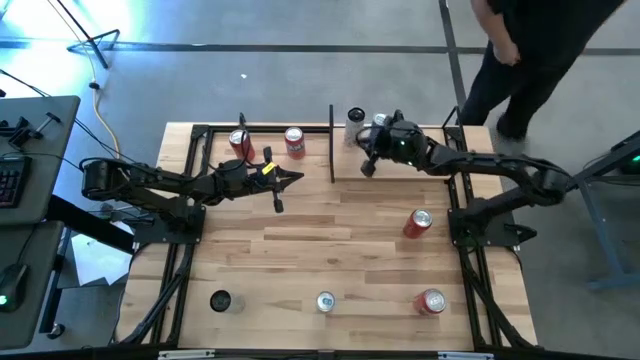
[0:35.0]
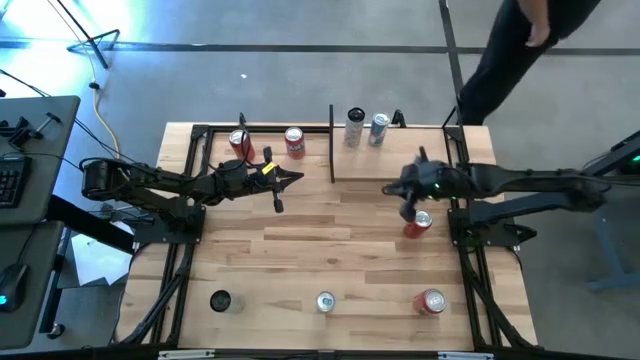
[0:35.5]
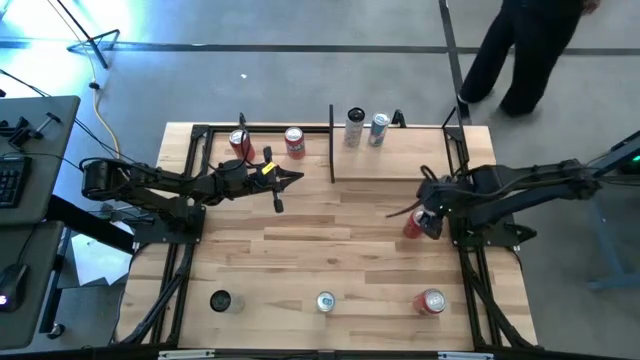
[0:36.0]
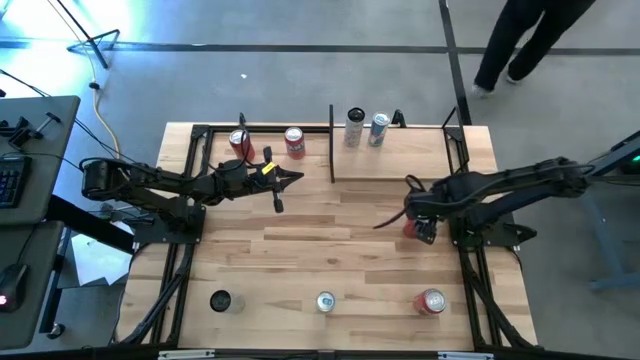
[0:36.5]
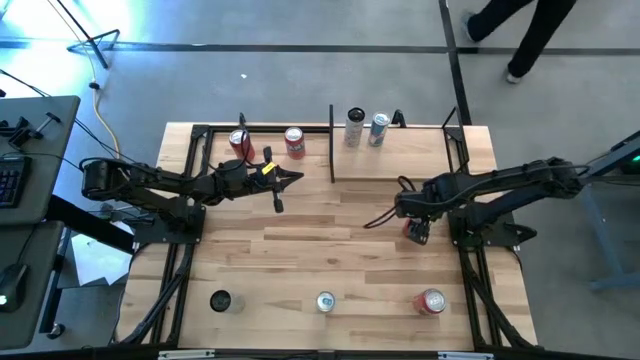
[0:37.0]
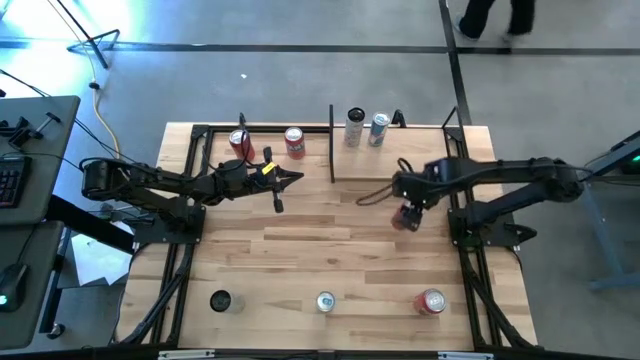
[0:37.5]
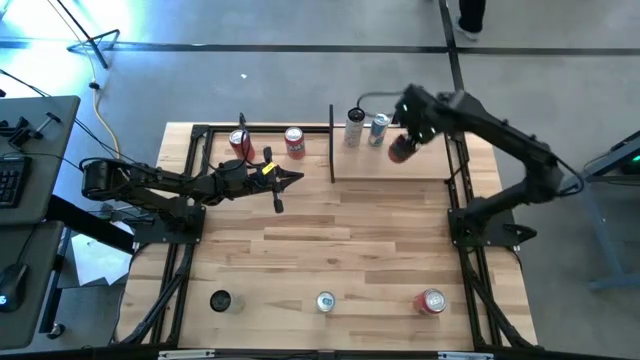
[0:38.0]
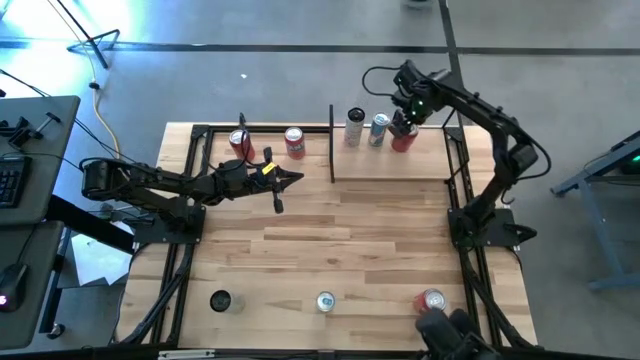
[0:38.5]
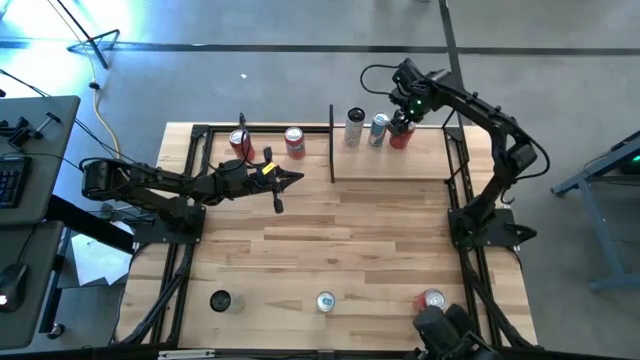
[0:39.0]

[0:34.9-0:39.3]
Task: Place canned beverage on shelf
Put the bottom red soda can on the shelf

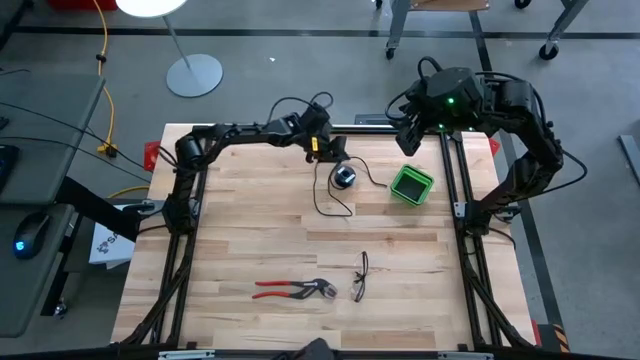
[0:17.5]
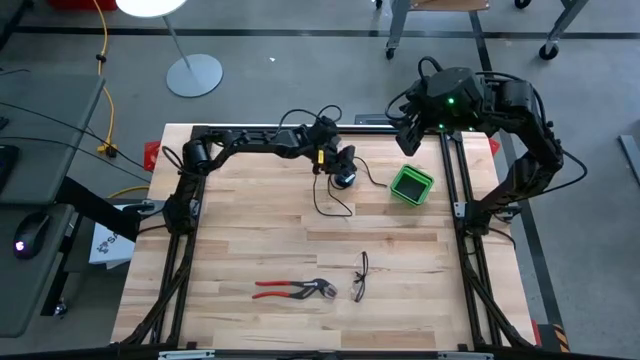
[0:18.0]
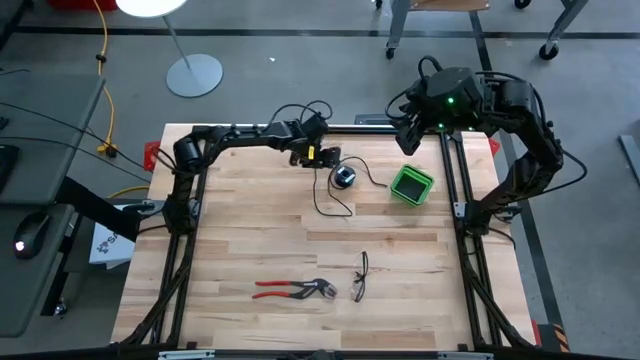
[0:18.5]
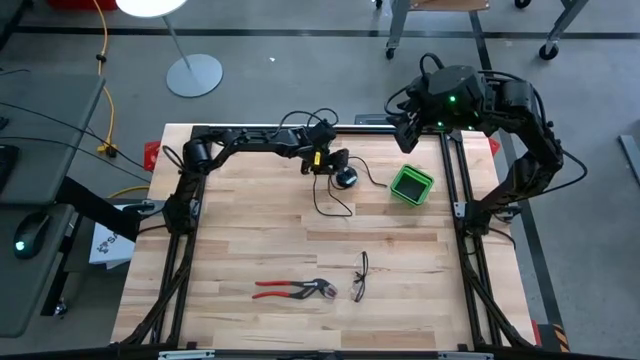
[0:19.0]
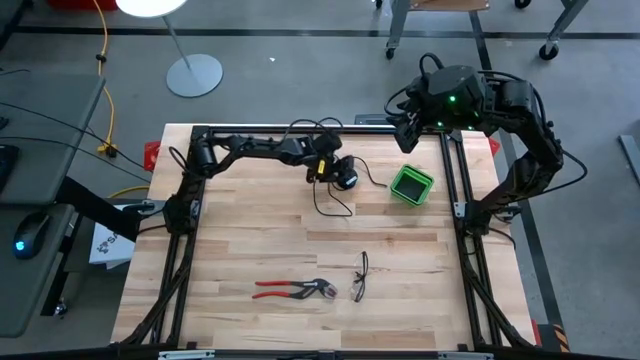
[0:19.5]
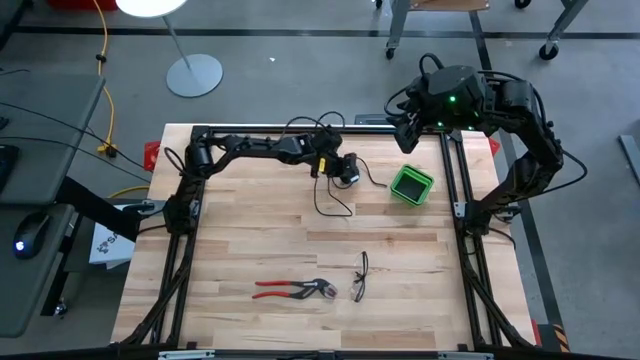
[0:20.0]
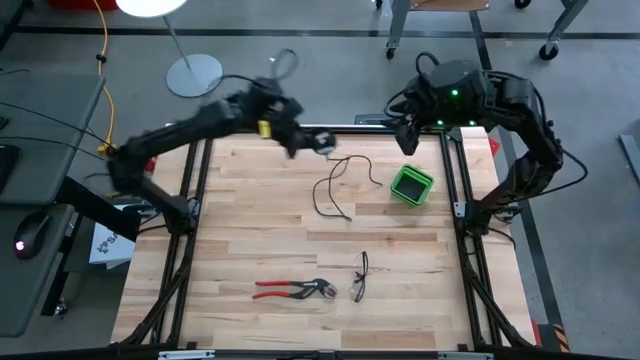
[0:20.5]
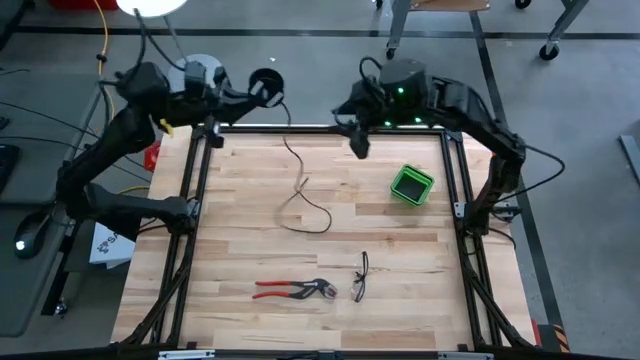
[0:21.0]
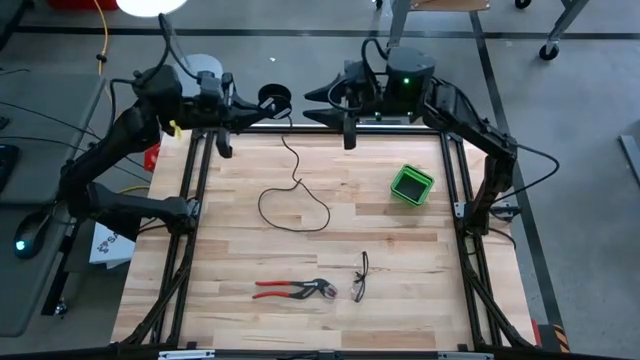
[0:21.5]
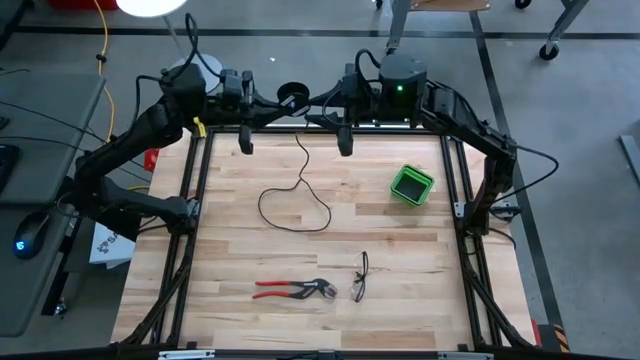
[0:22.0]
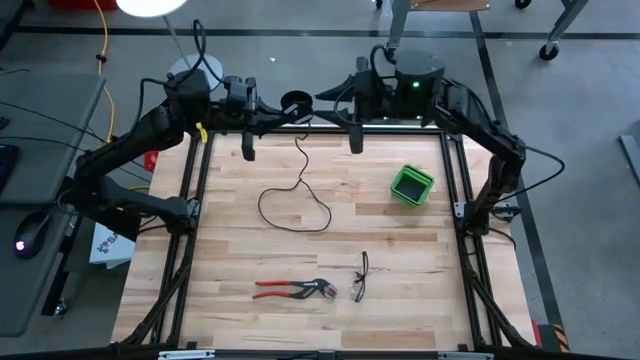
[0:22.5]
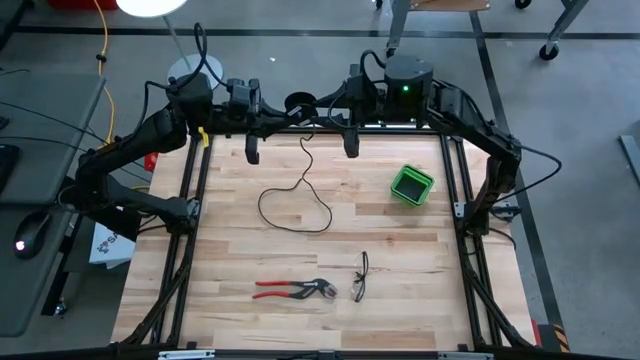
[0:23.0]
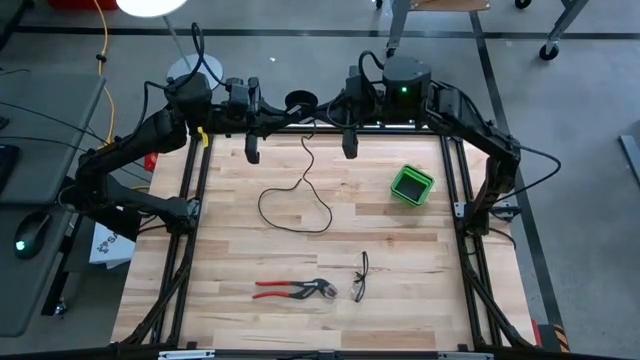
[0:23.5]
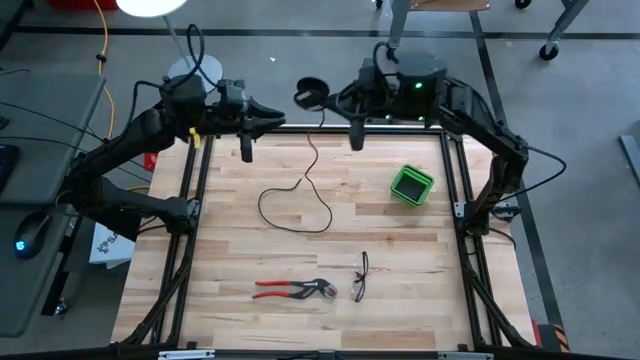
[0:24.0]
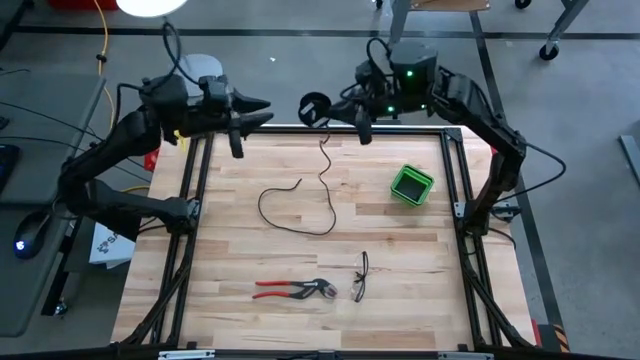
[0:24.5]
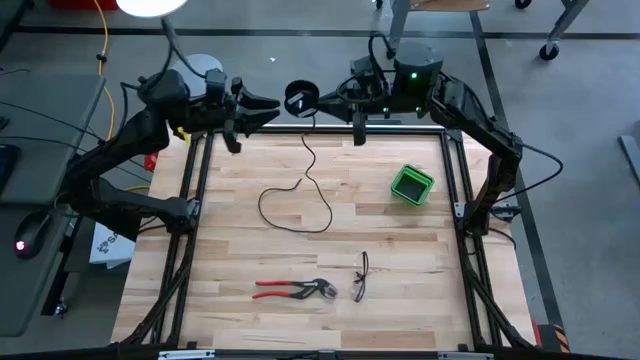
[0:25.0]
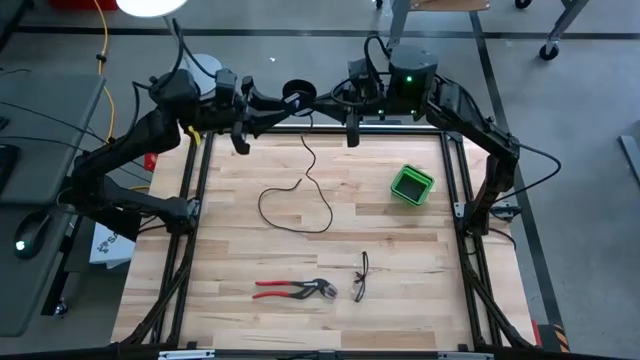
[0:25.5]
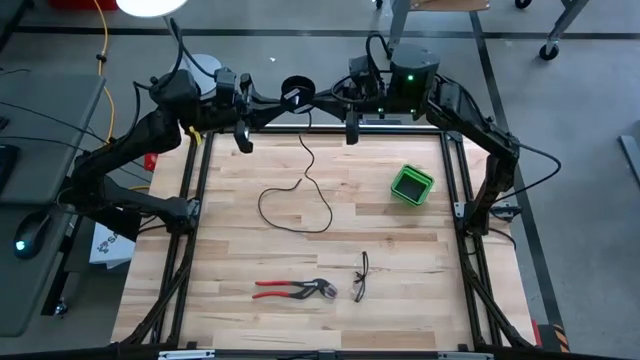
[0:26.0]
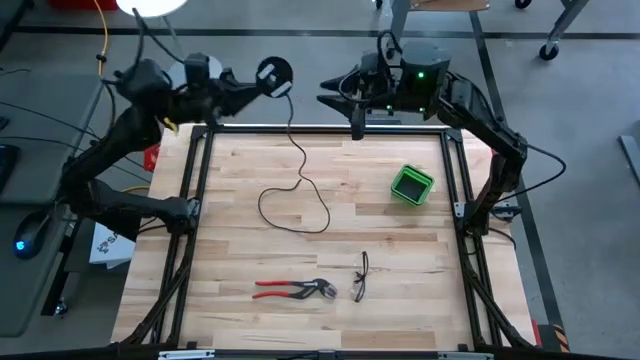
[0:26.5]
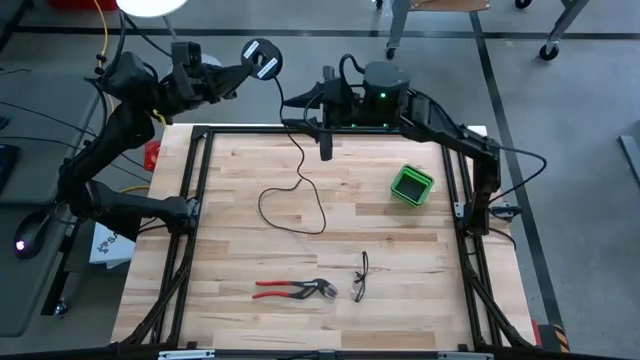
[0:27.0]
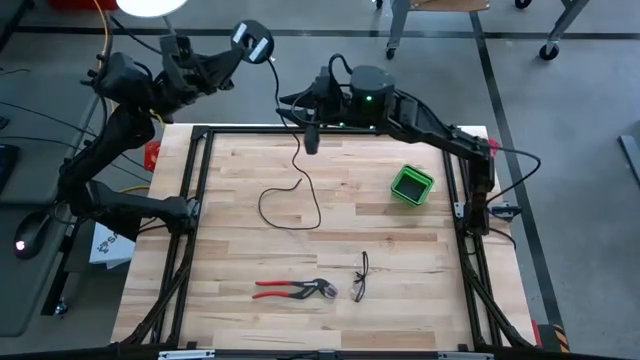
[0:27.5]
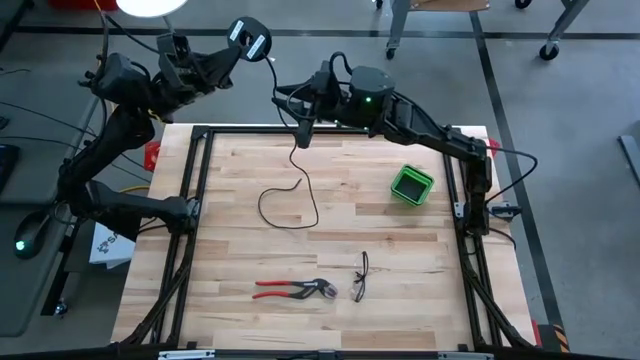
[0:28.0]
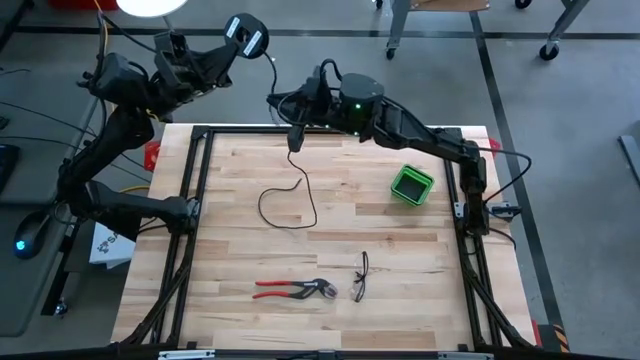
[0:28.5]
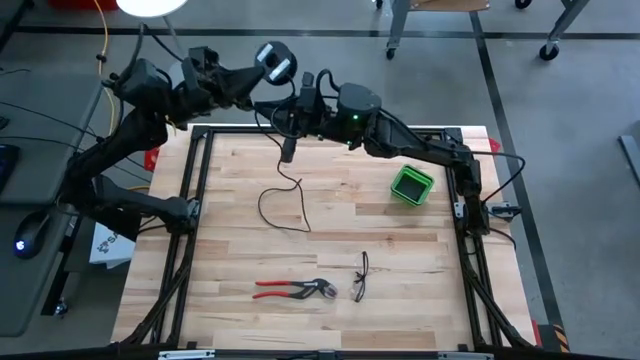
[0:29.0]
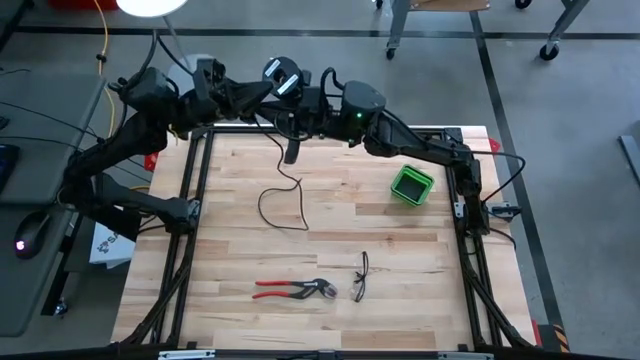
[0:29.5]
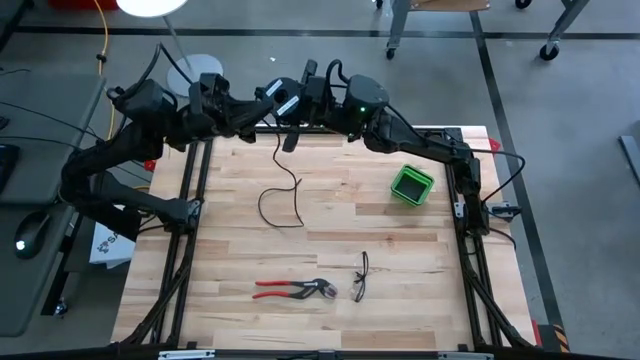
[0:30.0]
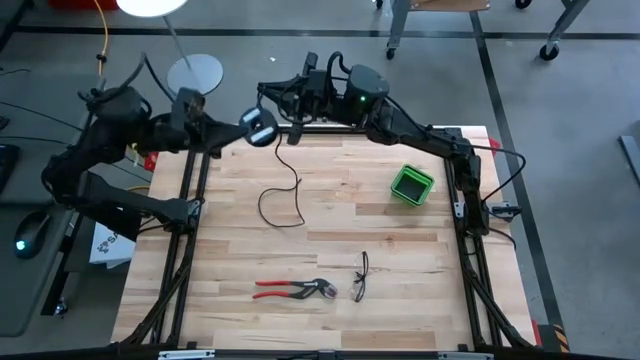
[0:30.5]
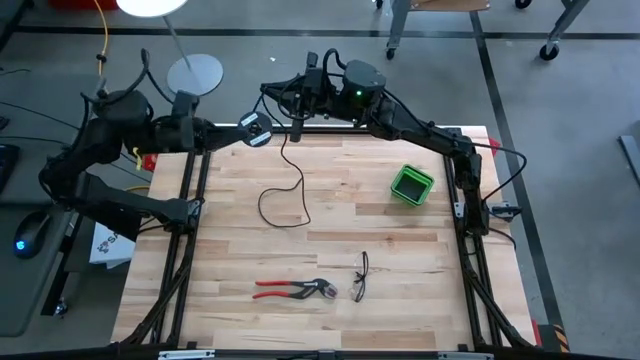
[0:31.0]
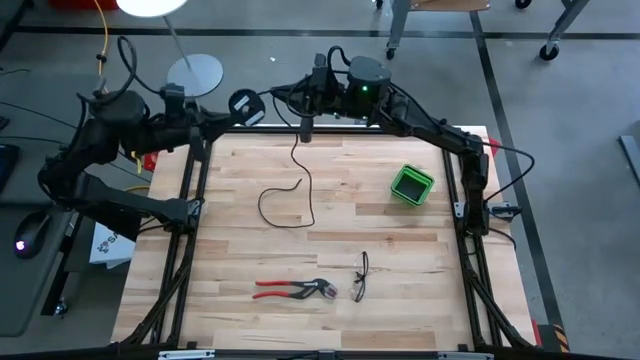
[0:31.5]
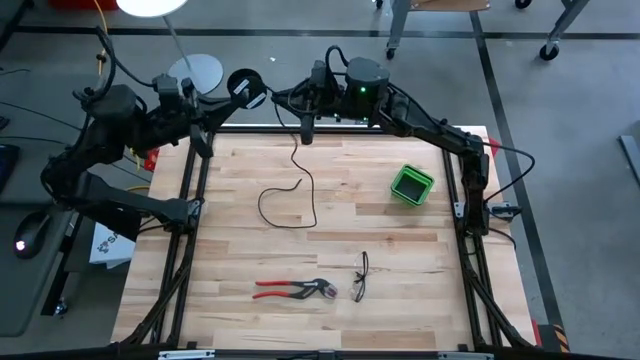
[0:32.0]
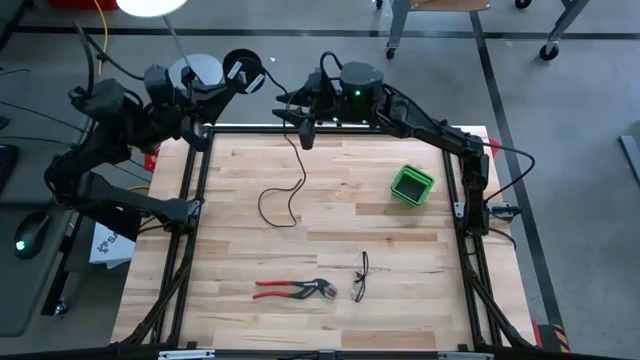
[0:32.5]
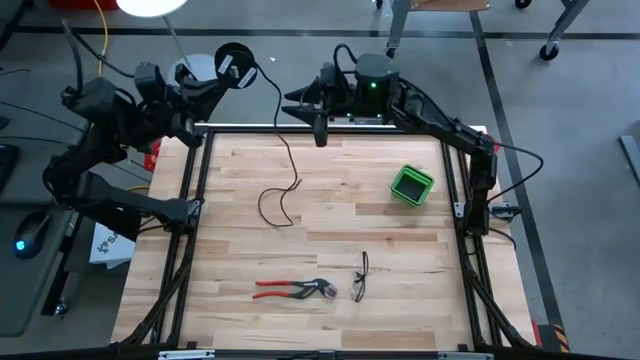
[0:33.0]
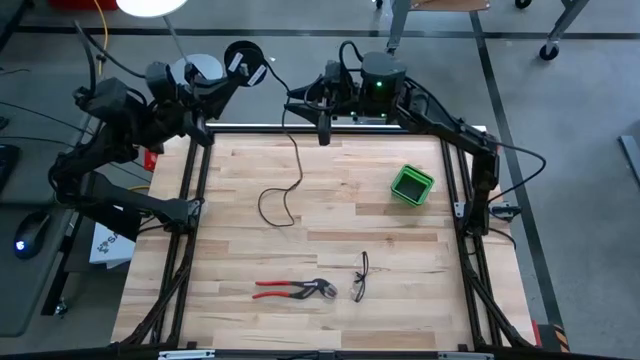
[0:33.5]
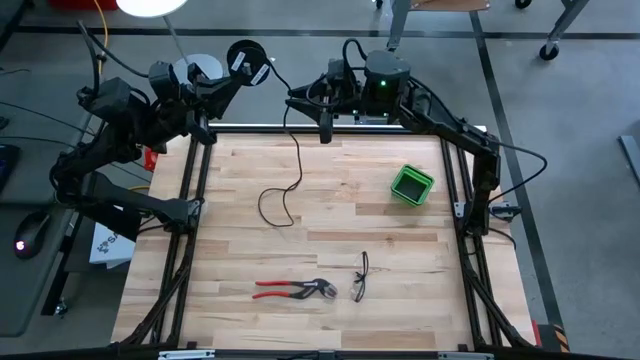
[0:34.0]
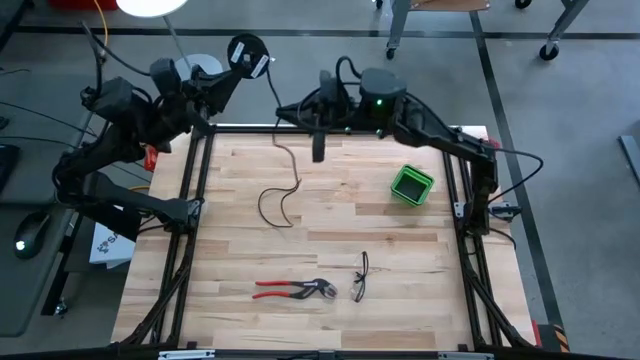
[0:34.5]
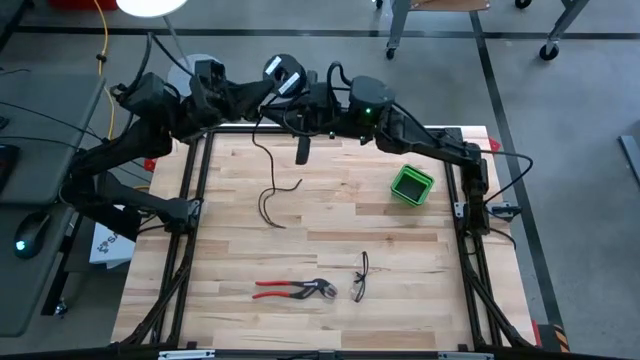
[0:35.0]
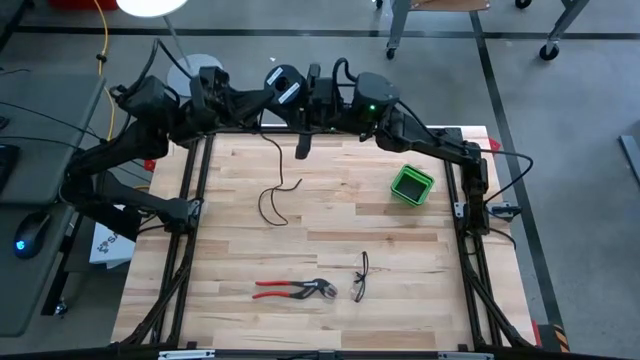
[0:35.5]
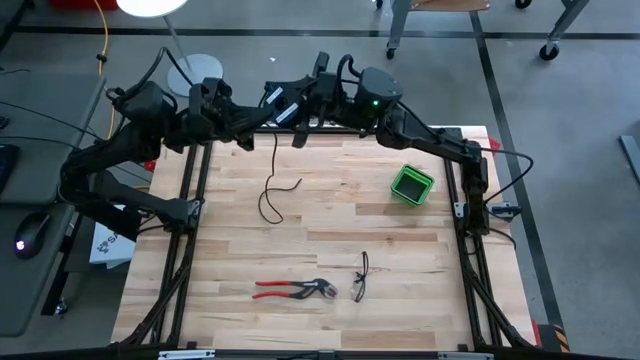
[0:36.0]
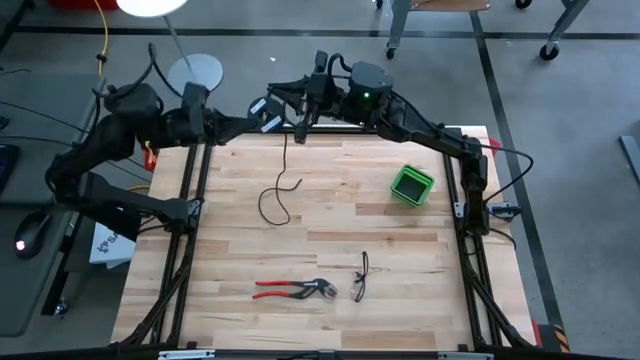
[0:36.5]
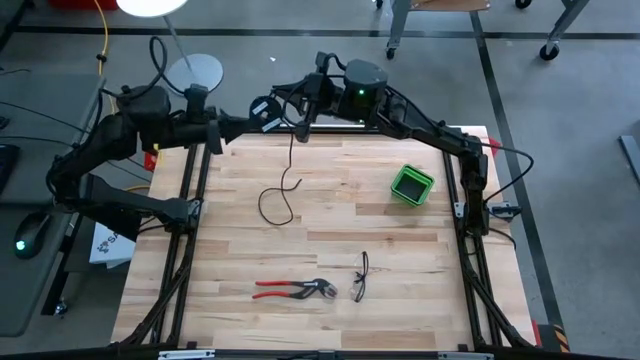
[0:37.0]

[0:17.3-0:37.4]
Task: Coil cords
Coil the black wire onto the black spool
